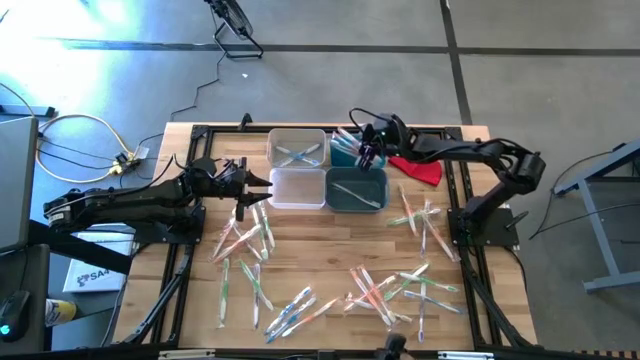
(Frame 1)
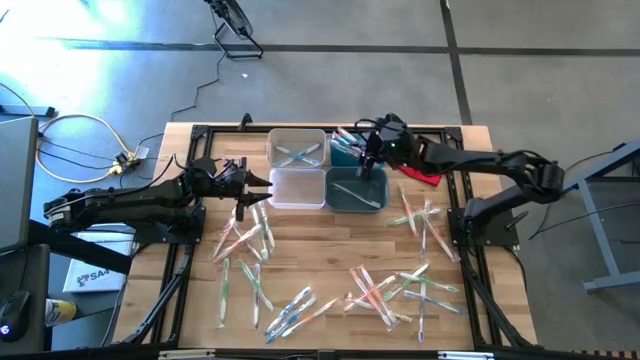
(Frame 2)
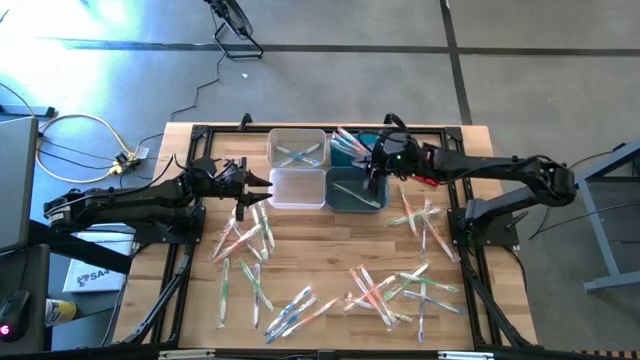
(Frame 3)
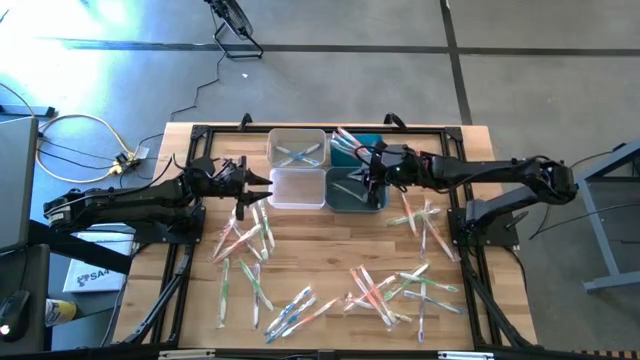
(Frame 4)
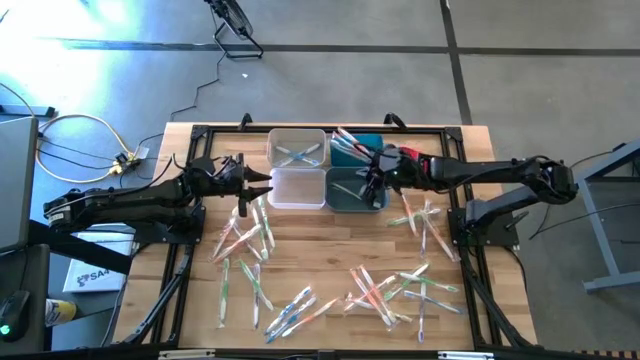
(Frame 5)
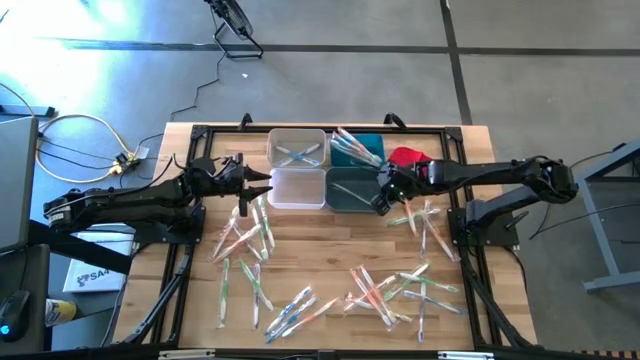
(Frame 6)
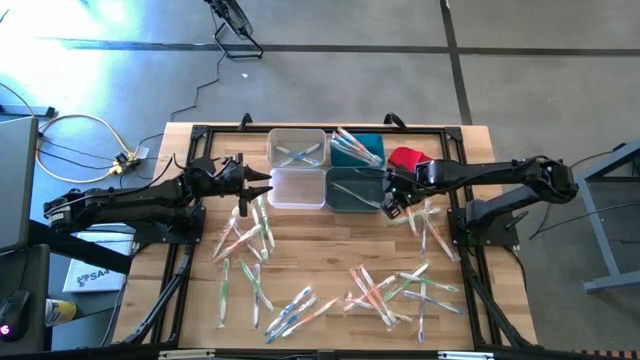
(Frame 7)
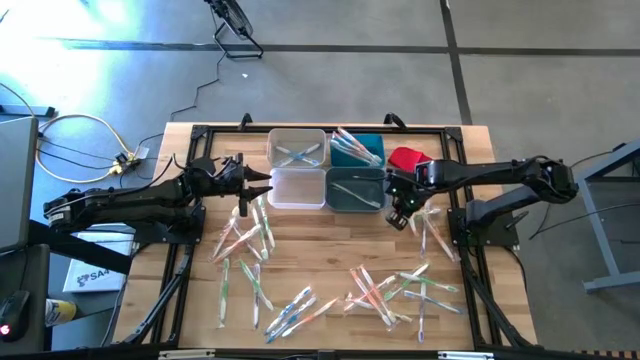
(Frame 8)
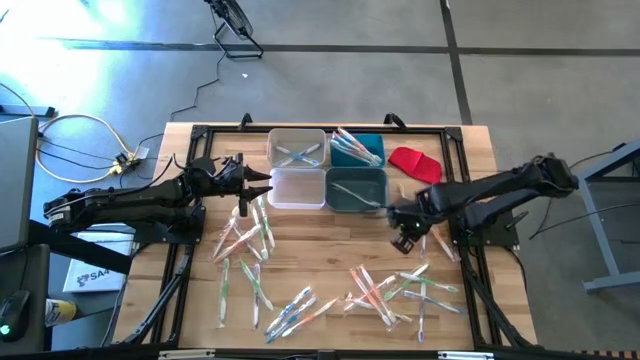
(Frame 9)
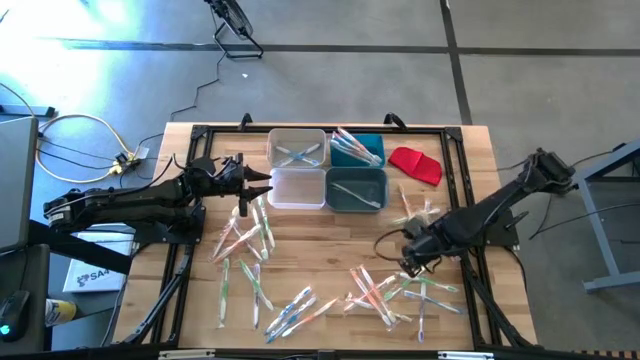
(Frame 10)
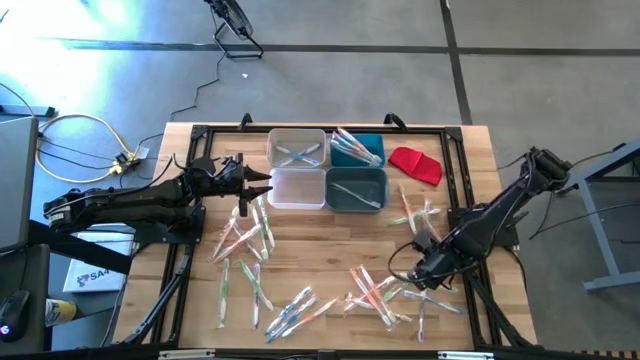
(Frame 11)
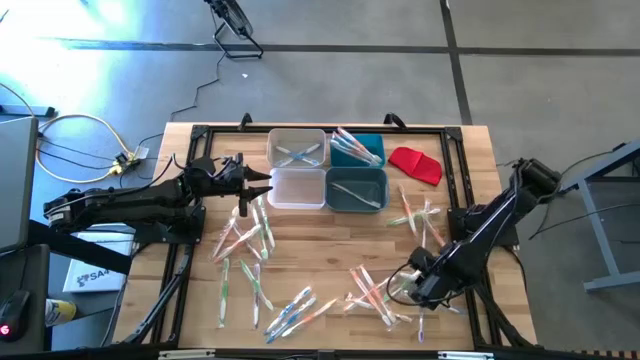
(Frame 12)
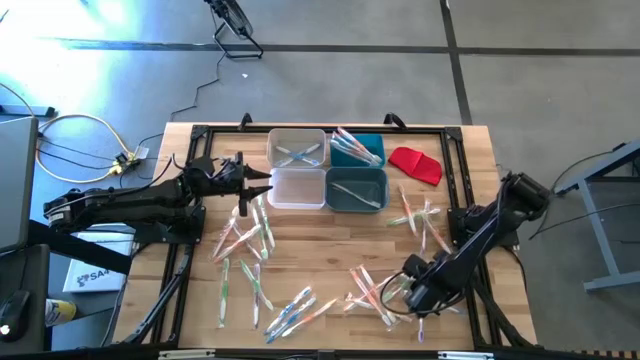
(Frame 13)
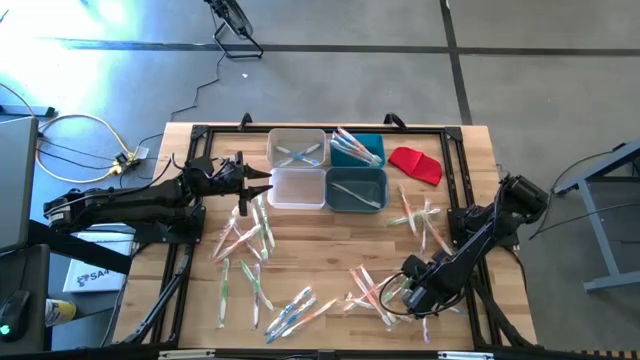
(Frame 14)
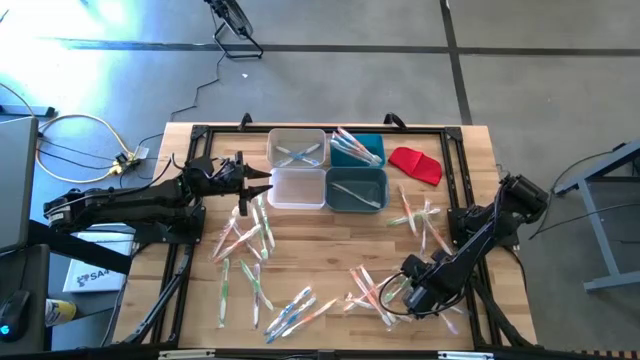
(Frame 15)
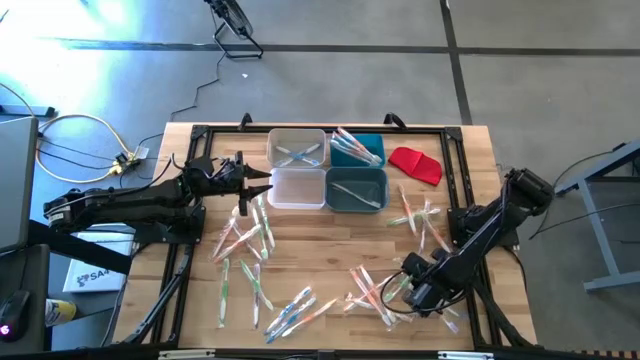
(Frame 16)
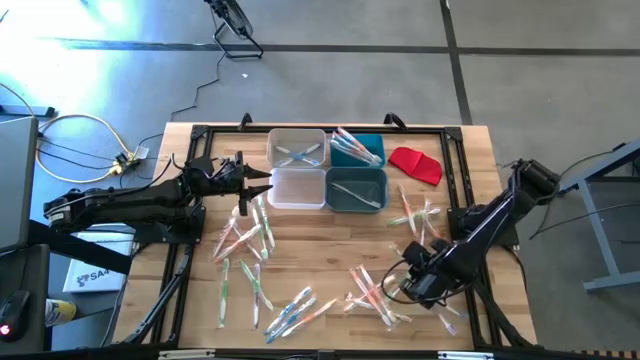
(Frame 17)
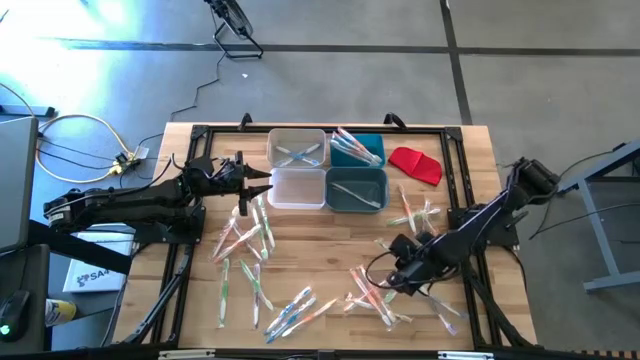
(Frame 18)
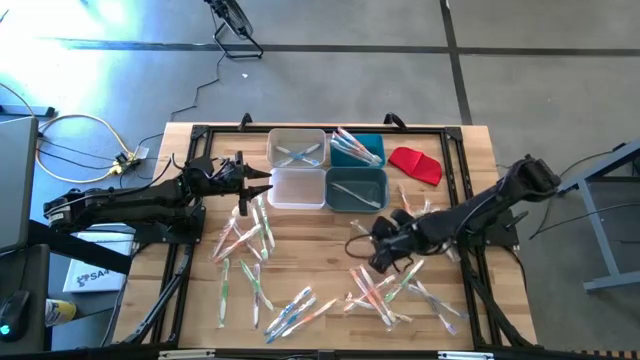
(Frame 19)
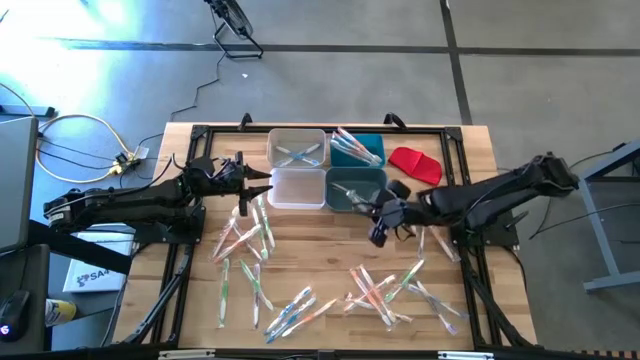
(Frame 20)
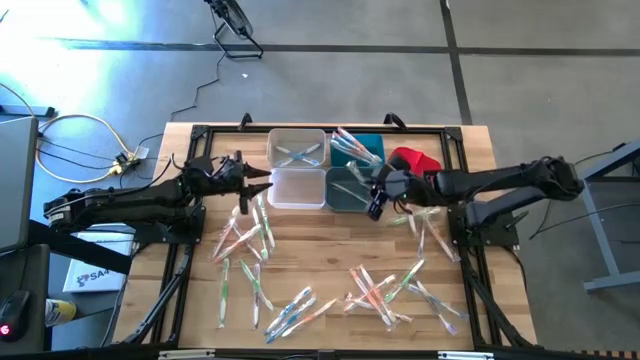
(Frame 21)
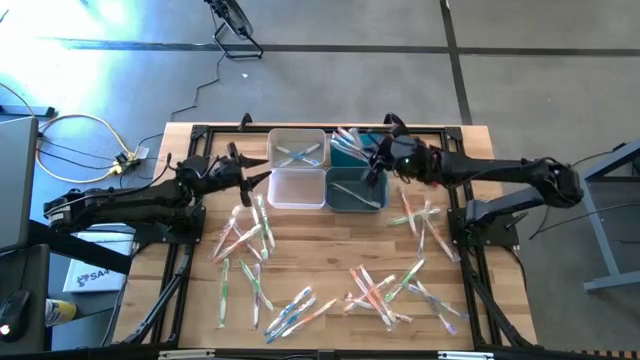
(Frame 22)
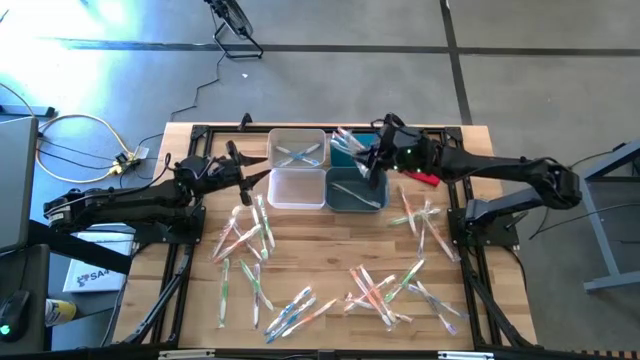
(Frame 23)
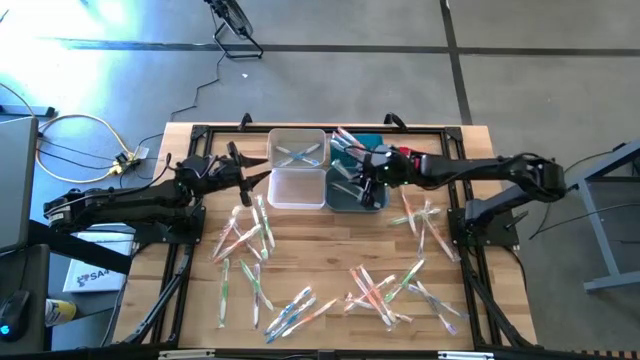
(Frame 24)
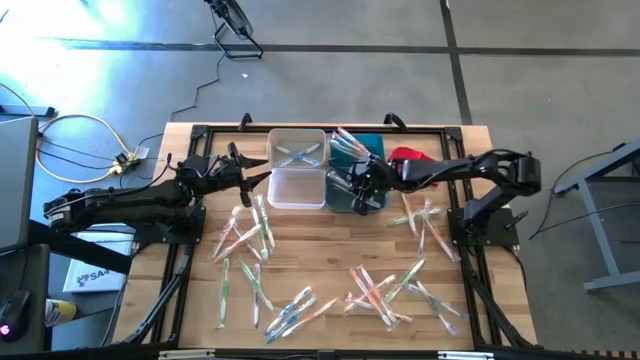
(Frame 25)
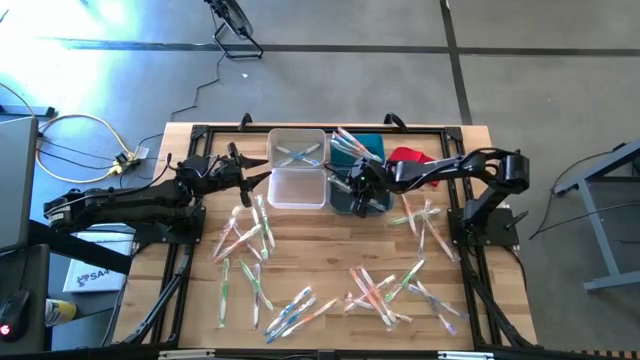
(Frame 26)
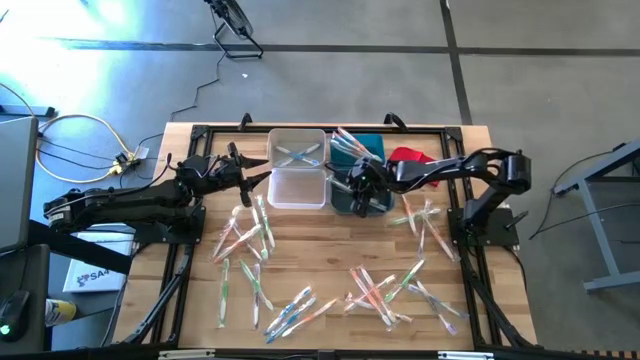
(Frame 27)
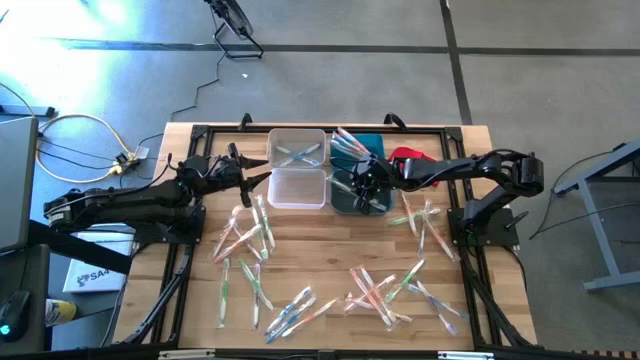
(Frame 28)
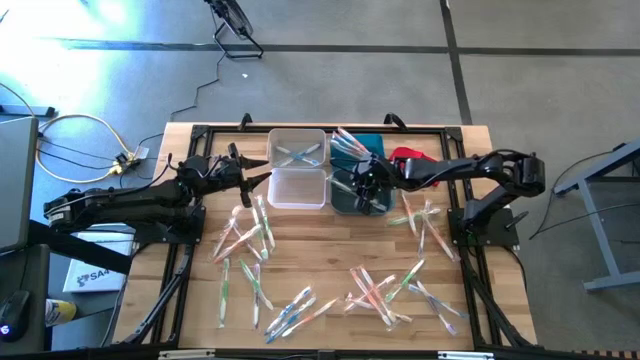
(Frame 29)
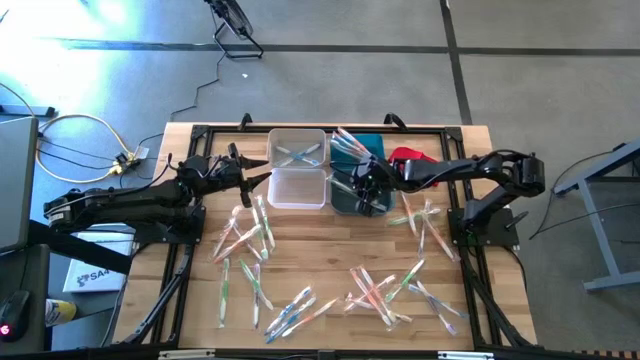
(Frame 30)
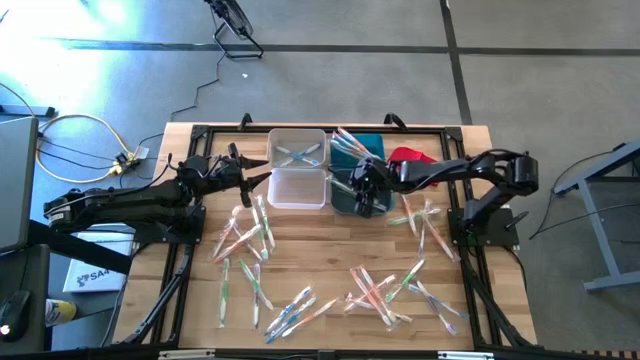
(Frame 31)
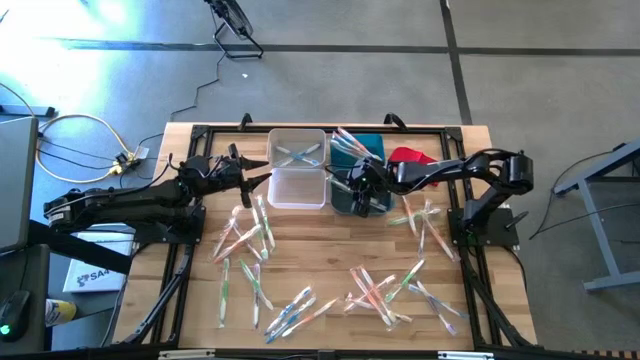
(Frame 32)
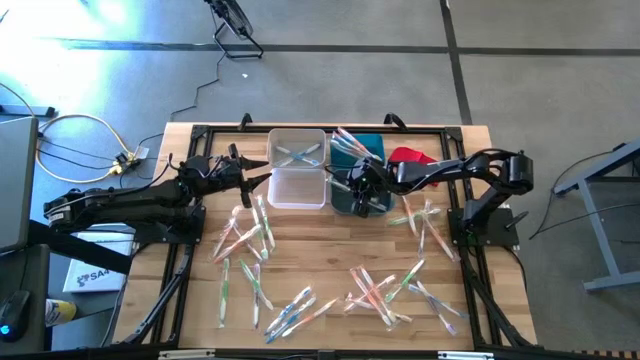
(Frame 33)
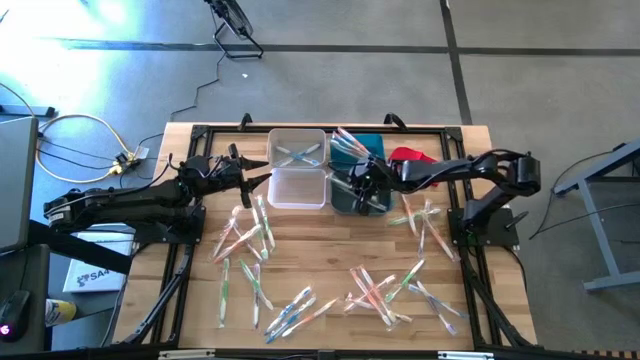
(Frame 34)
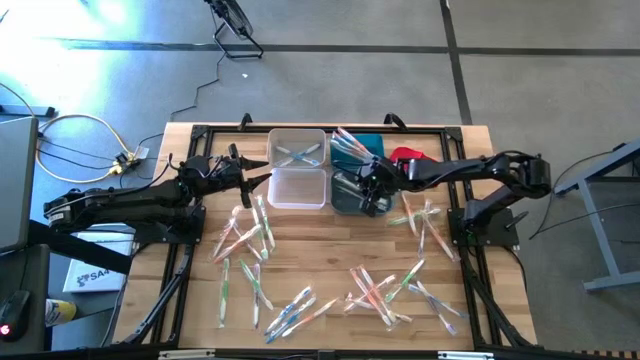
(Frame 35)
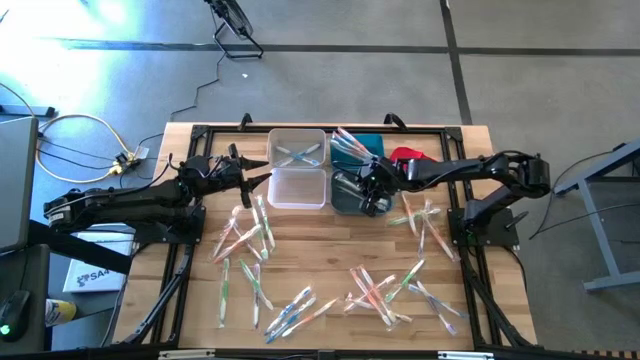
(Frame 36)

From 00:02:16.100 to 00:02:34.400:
Task: Pick & Place Toothbrushes
Put the green toothbrush into the green bin

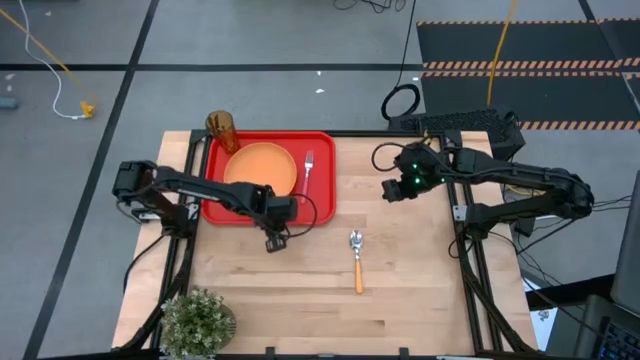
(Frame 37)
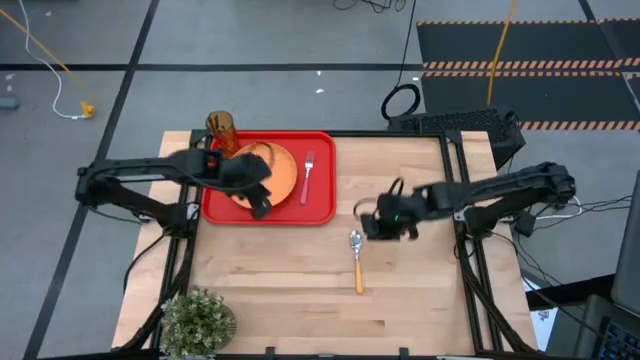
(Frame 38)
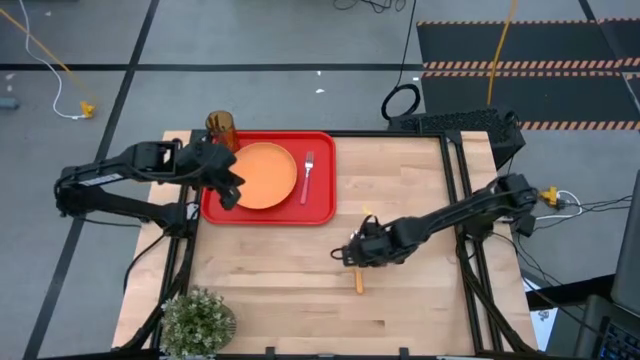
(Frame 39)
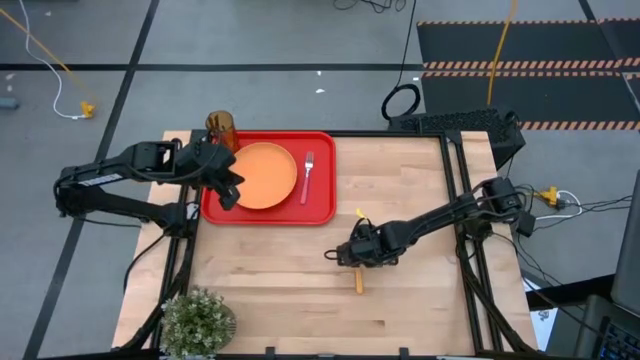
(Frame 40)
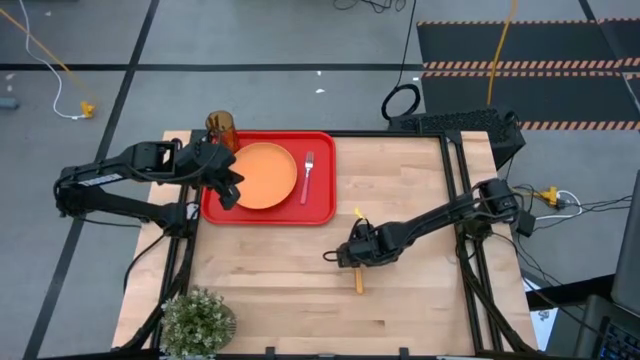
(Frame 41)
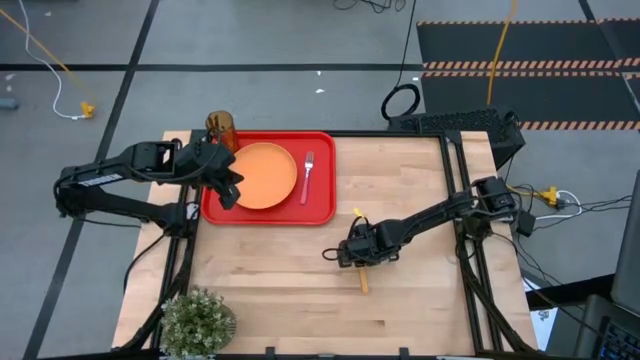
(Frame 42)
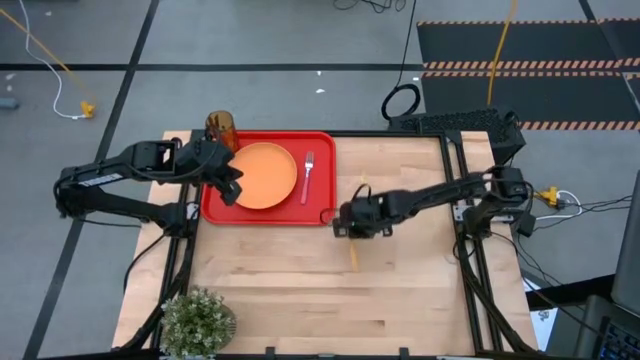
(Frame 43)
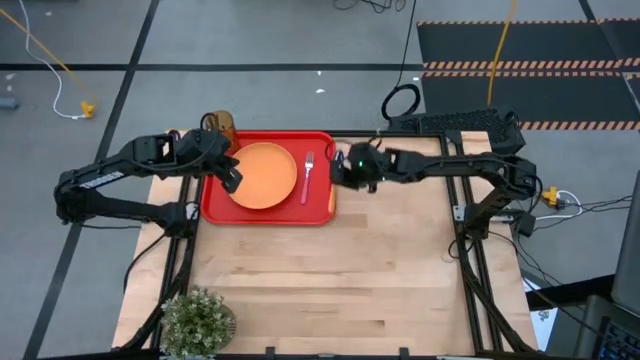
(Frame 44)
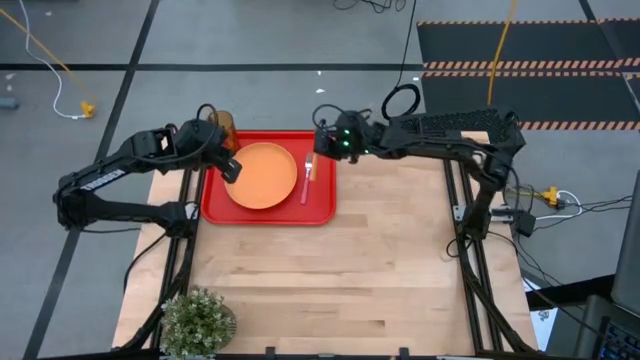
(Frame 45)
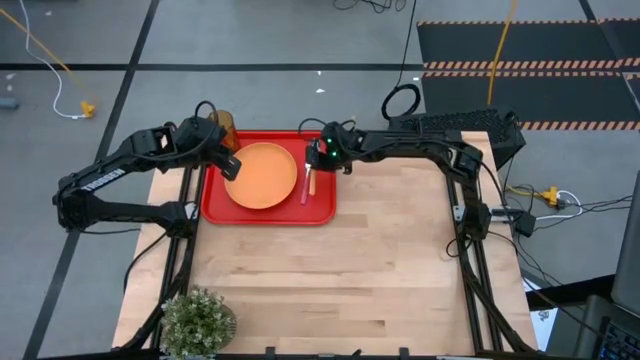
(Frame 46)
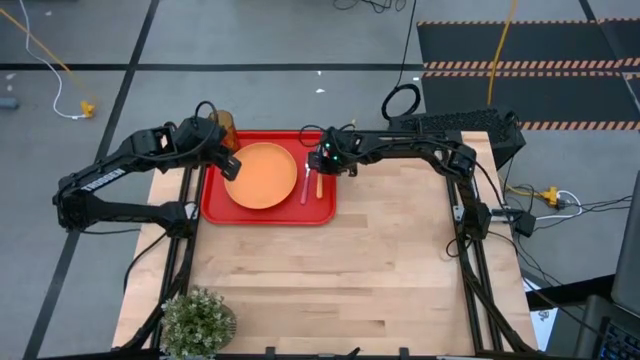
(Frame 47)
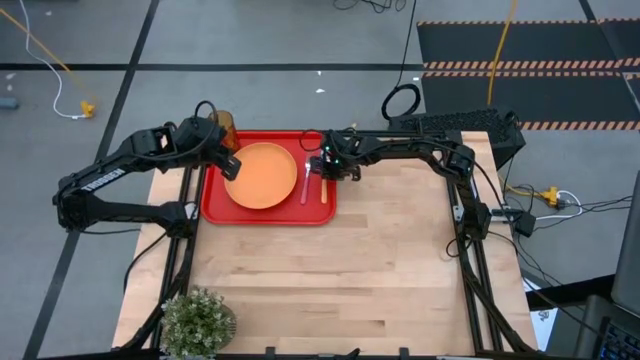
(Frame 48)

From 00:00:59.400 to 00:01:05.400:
Task: Pick and place plate/cup/fork/spoon on tray
Put the orange spoon on the red serving tray to the right of the pink fork
